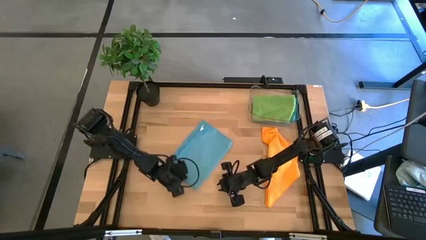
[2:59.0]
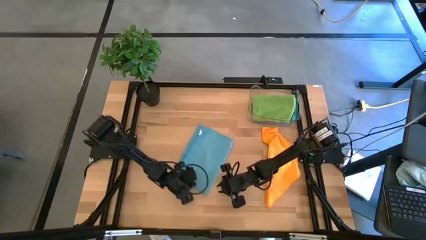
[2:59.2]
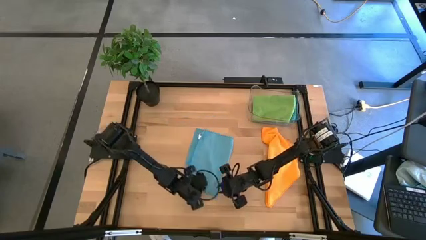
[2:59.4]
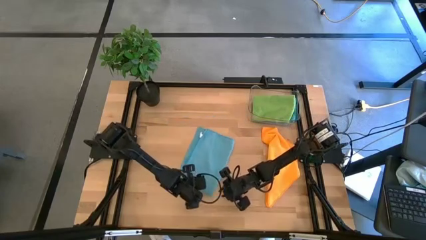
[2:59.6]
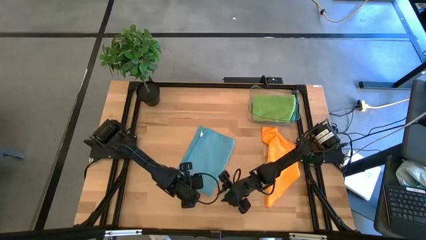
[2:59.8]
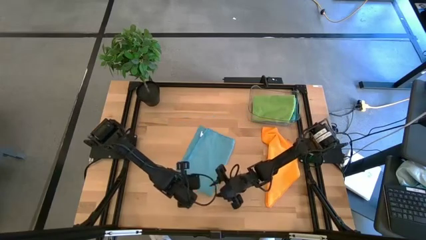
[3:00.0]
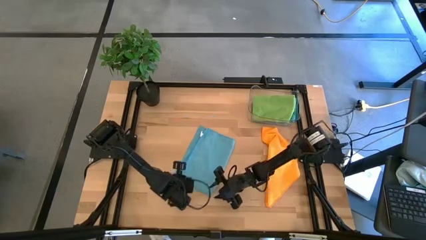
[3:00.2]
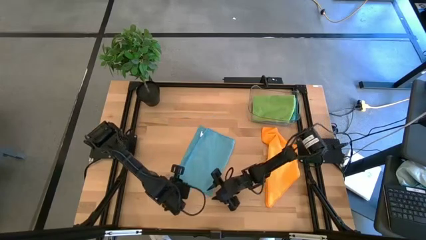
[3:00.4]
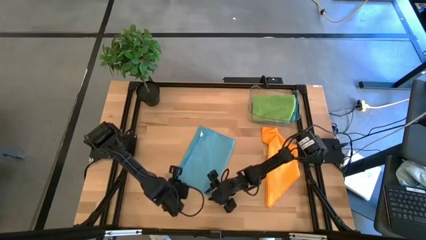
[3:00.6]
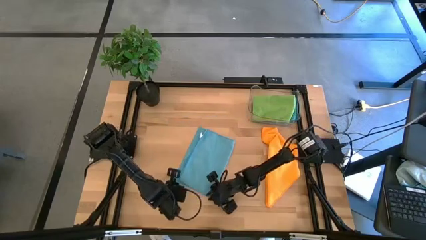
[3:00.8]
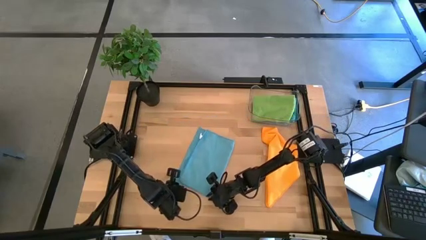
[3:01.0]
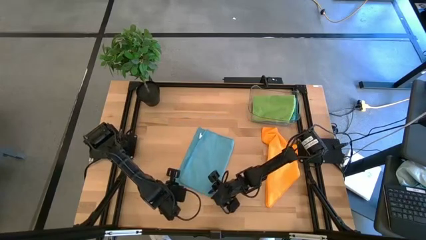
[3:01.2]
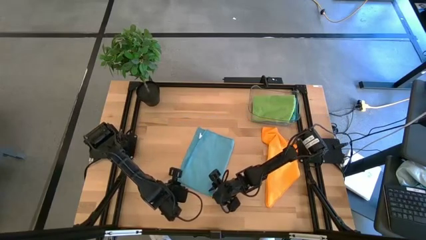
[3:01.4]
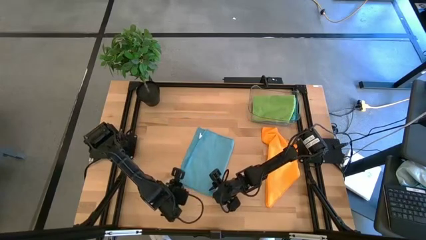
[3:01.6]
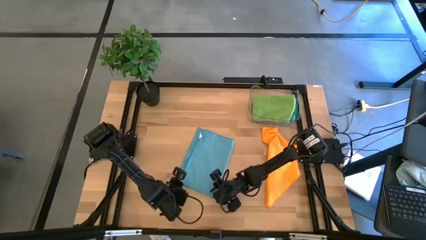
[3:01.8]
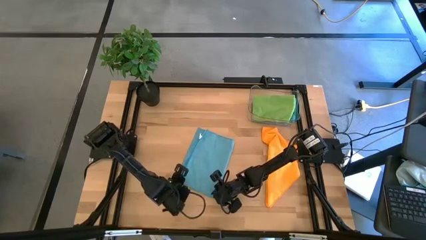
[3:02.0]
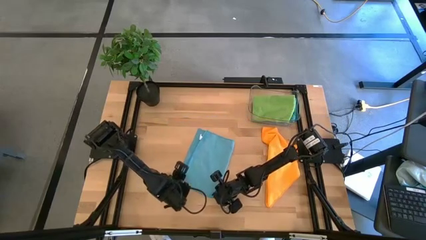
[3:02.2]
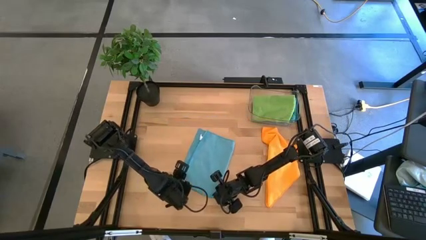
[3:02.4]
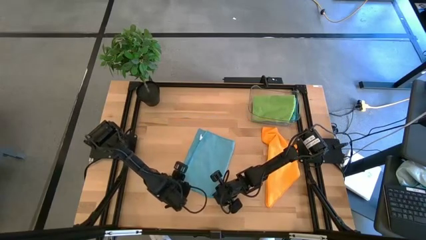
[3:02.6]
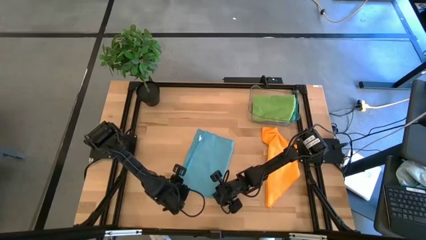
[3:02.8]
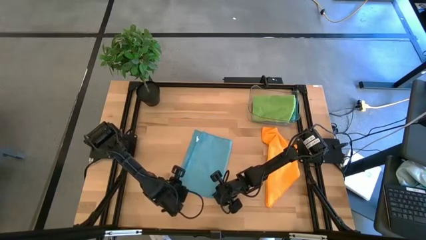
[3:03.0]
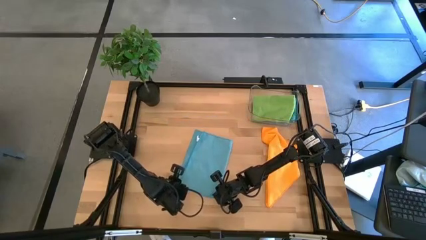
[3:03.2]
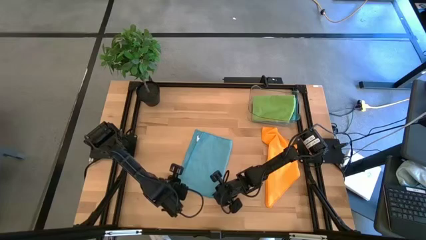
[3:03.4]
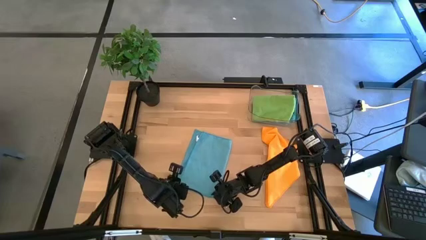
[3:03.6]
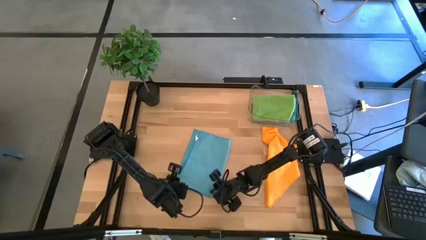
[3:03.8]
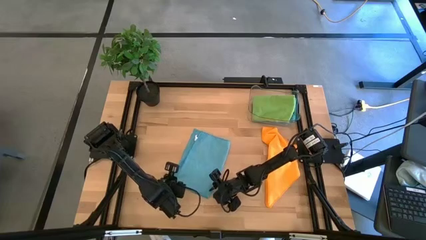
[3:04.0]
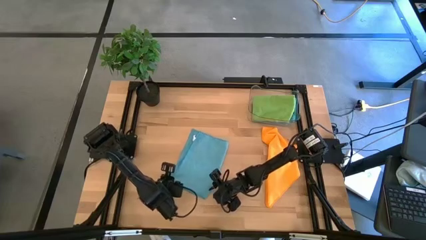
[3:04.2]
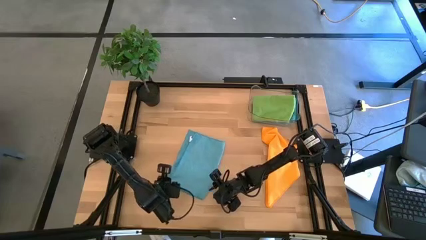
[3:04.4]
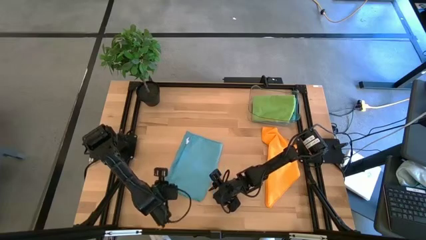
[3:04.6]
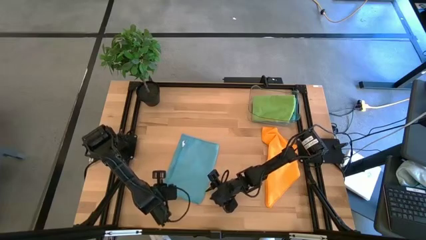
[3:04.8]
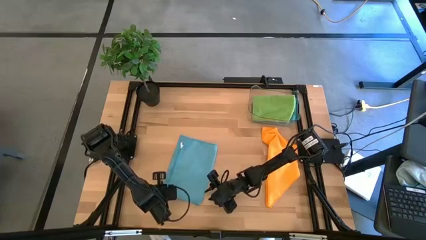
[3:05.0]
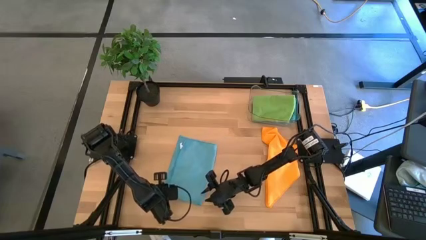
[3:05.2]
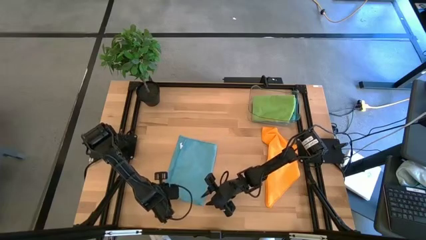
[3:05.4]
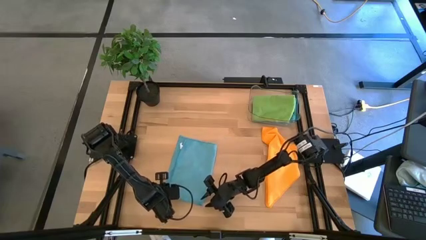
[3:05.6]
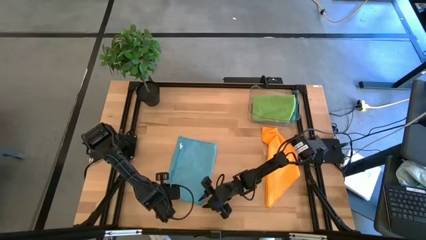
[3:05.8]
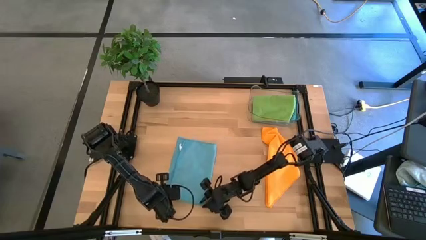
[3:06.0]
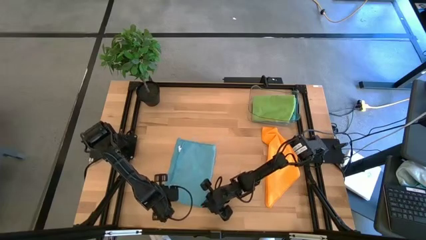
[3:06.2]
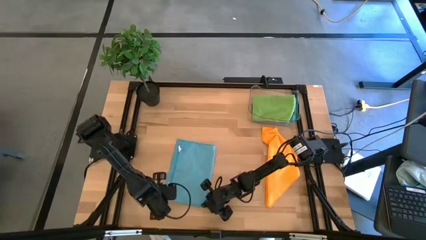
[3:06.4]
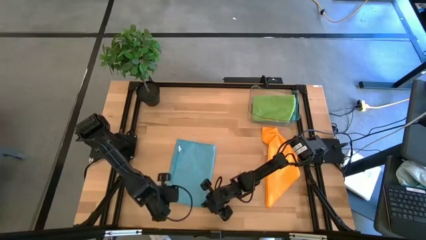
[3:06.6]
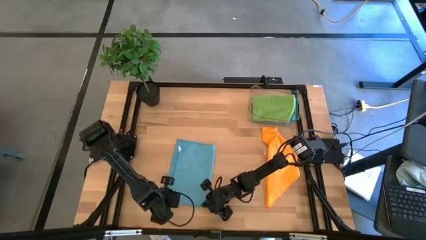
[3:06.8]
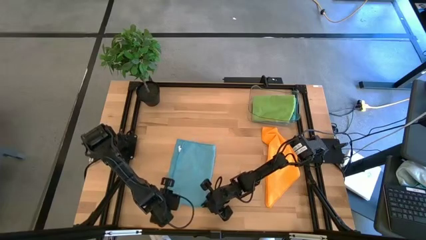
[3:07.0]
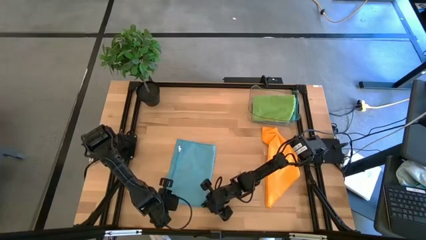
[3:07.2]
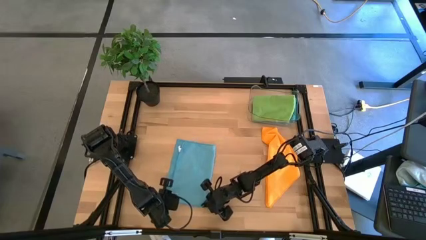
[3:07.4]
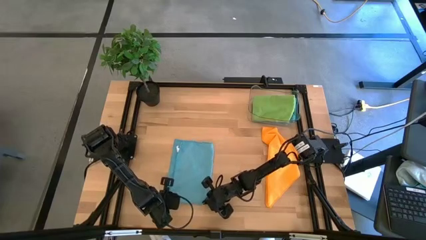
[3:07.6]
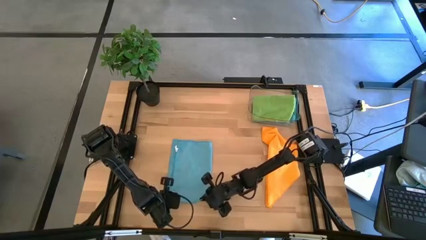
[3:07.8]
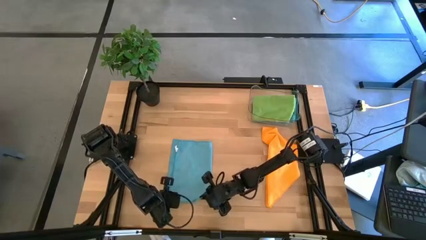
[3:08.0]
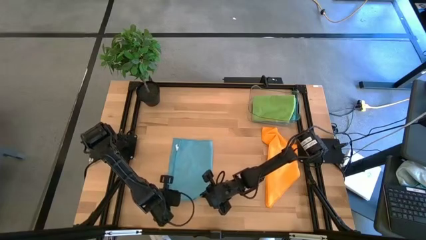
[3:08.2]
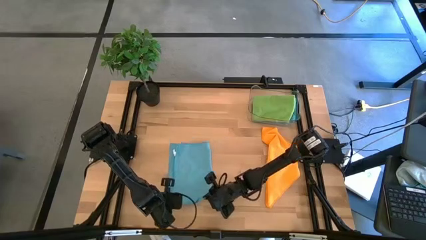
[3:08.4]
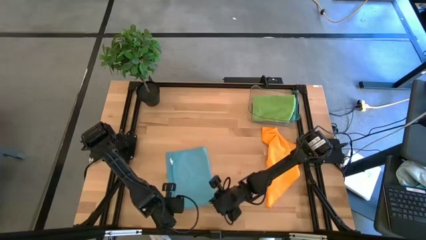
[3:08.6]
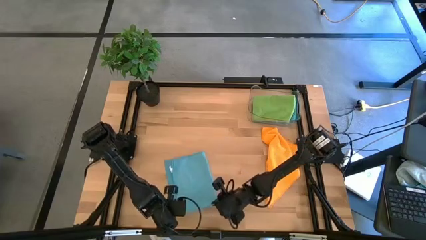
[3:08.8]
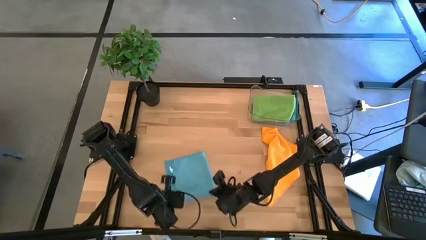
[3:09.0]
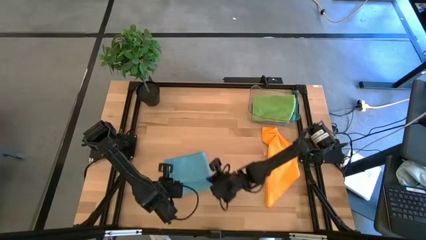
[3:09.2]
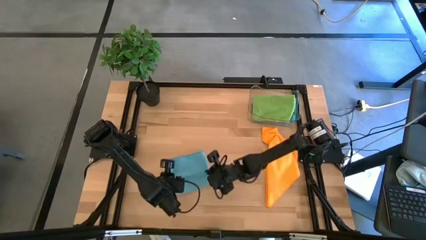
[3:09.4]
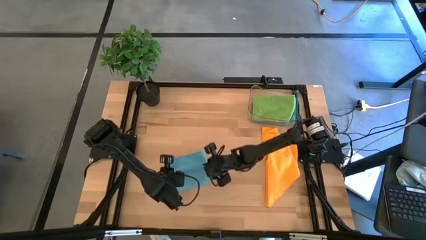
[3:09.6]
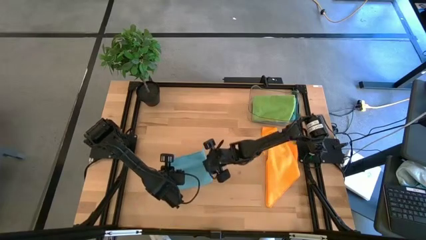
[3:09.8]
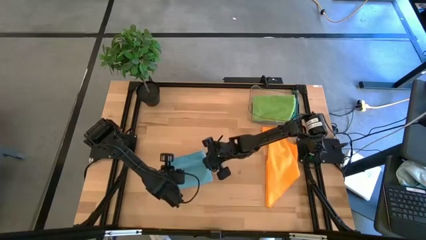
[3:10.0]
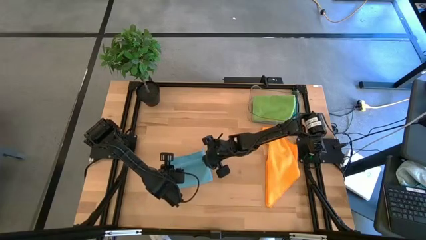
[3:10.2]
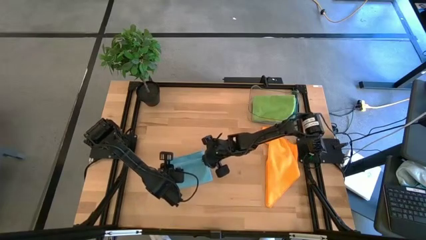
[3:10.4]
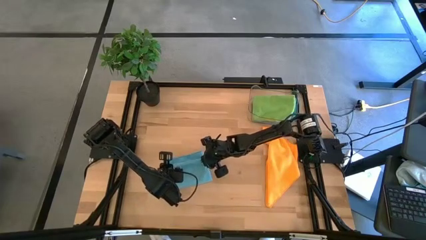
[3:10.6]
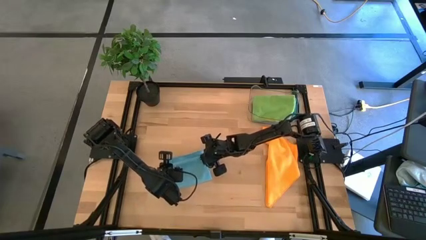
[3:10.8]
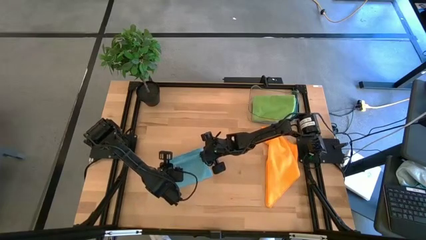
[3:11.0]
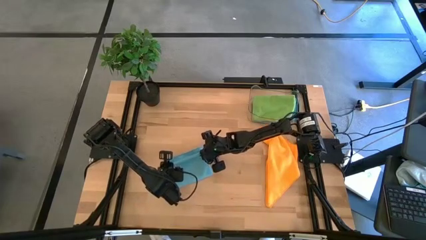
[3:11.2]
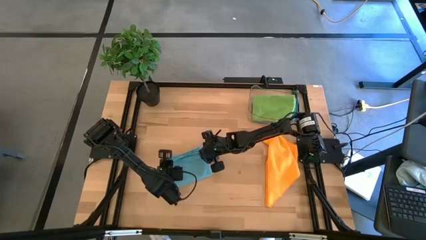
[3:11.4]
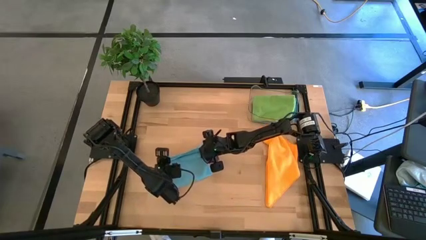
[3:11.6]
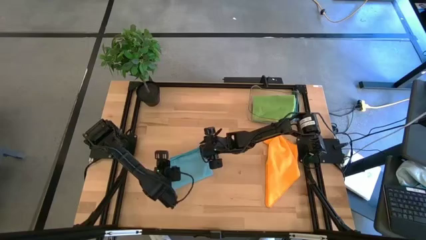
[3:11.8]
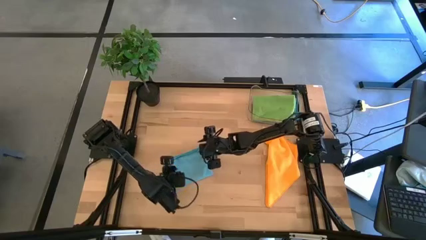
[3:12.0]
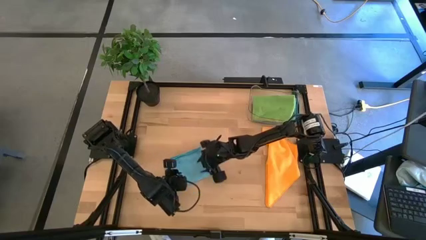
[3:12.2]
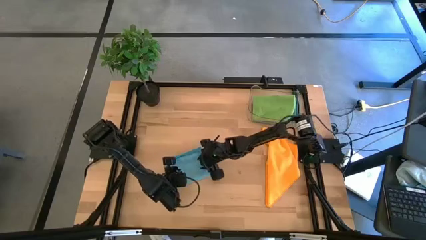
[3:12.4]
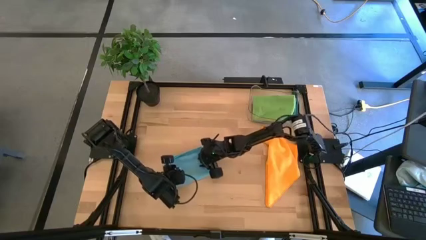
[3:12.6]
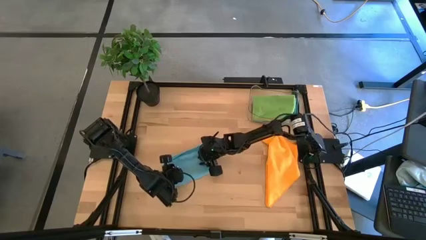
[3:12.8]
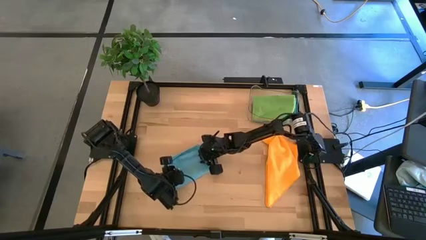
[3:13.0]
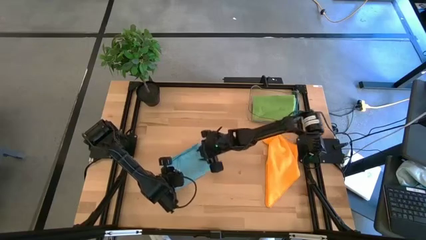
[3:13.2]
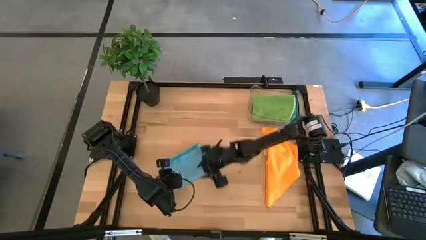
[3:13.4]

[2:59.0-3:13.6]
Task: Fold microfiber towels
Fold the light blue microfiber towel

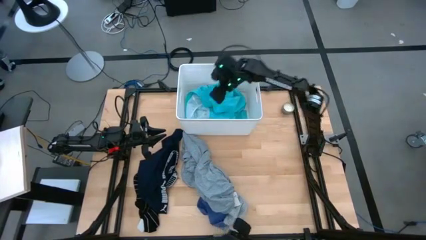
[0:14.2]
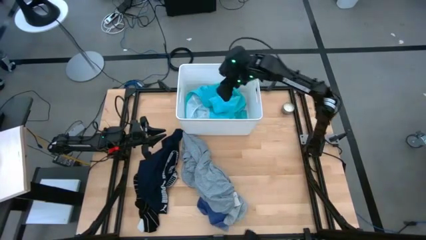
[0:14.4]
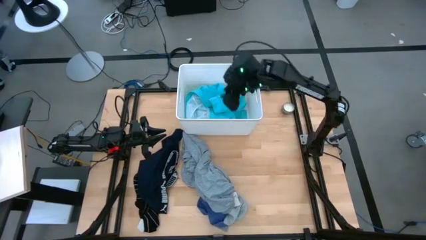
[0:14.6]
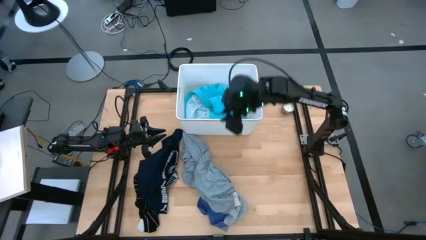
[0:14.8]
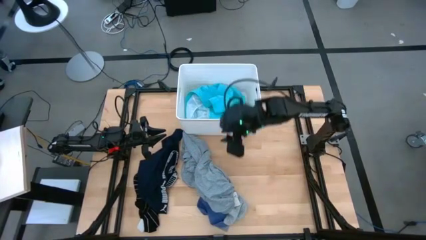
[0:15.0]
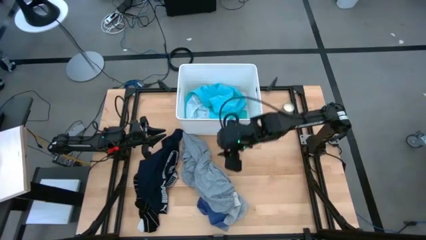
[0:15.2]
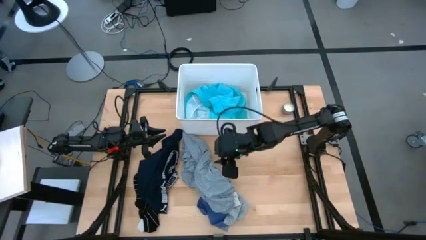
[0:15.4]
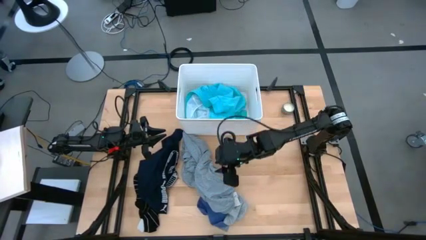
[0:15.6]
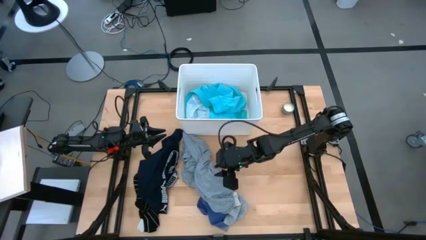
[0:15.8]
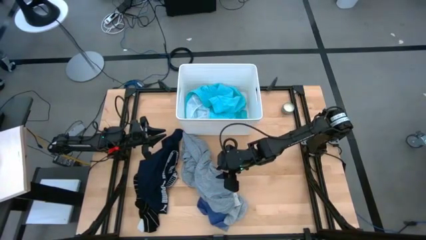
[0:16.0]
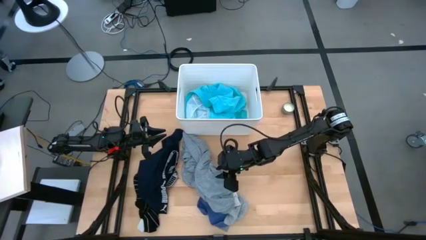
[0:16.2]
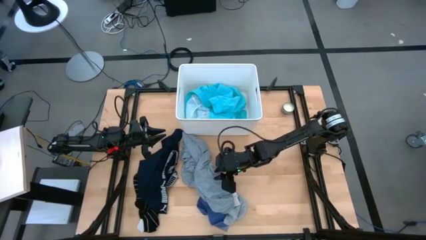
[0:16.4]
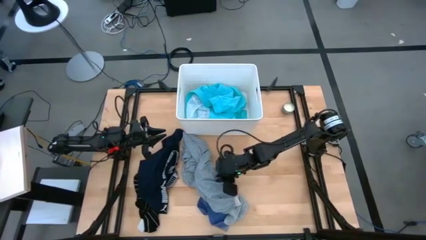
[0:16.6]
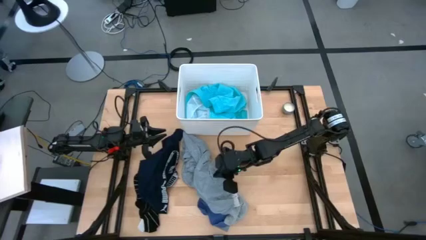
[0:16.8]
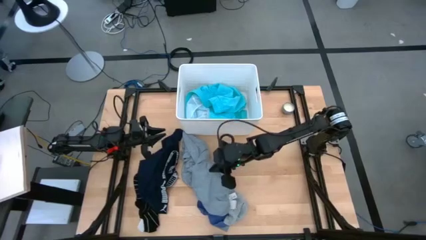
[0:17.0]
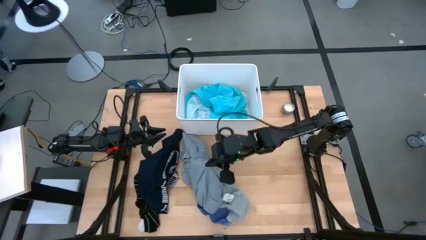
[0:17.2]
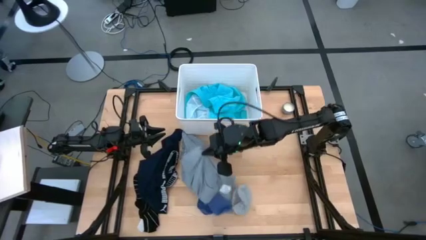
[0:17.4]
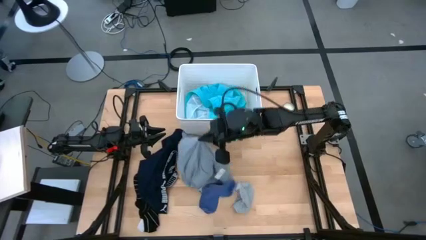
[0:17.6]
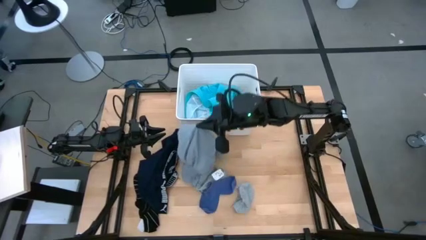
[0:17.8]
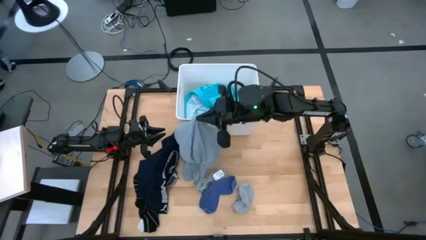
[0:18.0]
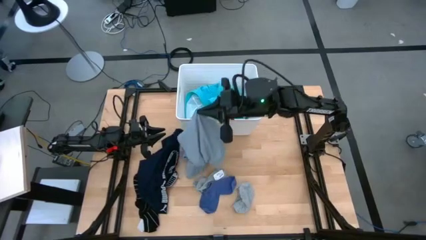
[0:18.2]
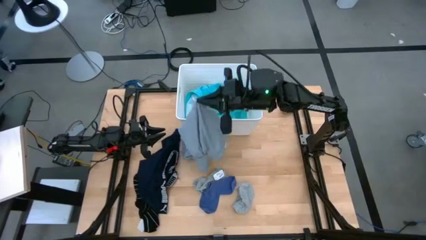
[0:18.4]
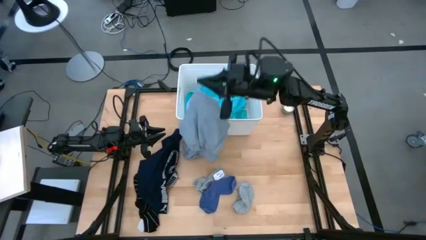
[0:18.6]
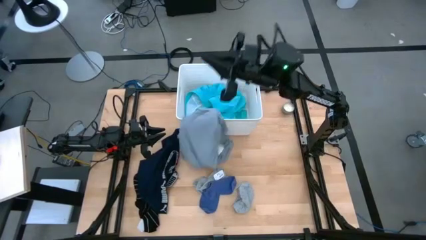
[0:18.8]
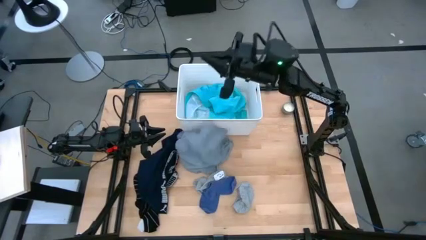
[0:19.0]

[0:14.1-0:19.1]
Task: Sort clothes
Put the gray shirt into the white laundry bin
